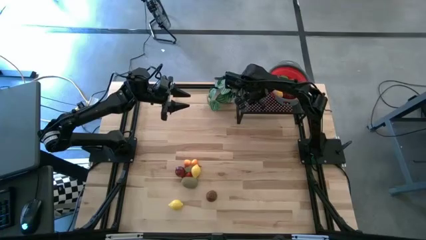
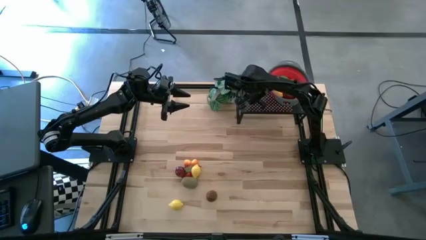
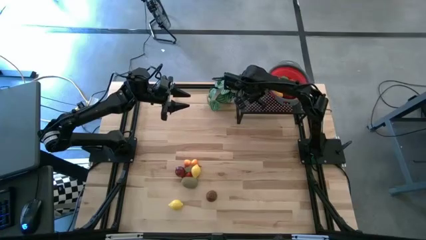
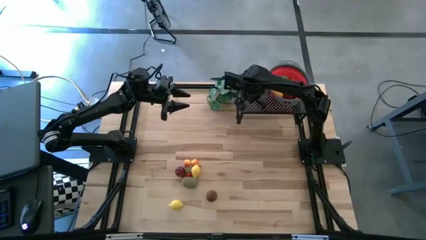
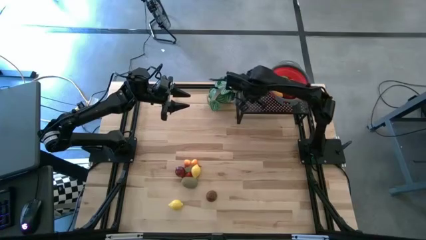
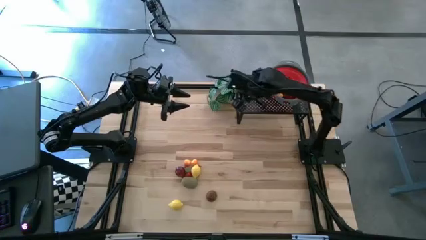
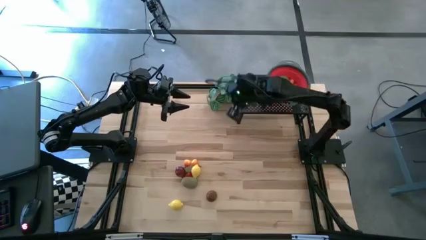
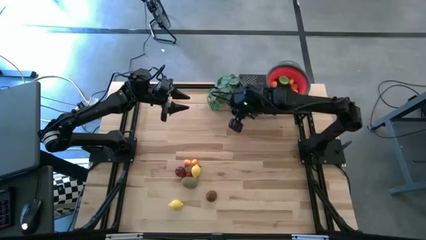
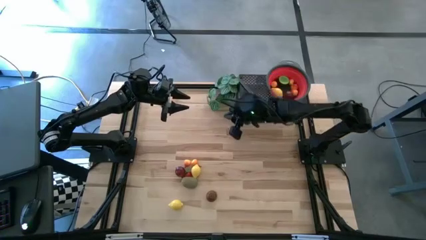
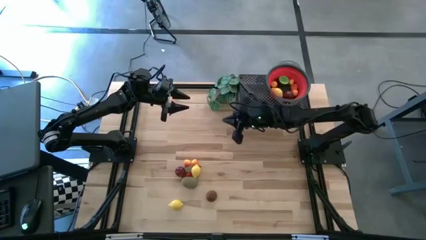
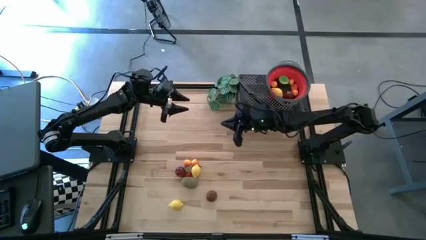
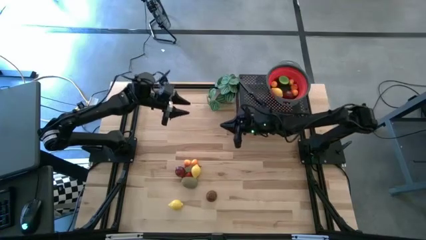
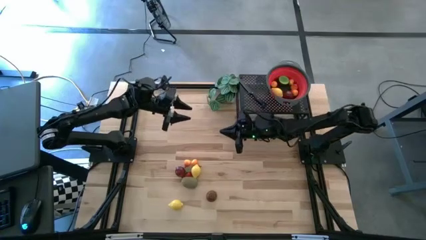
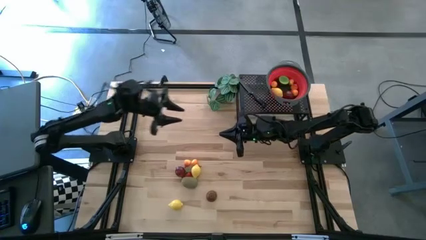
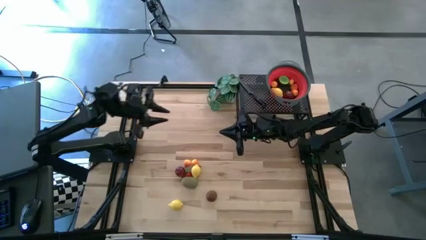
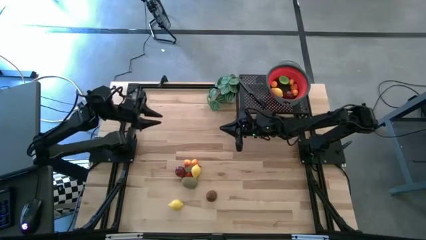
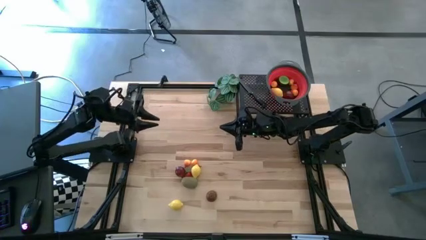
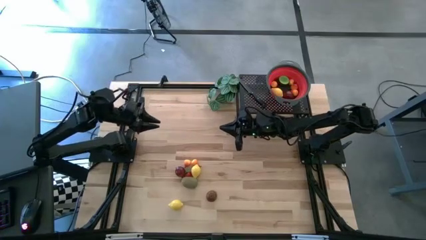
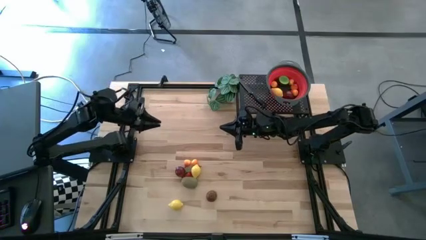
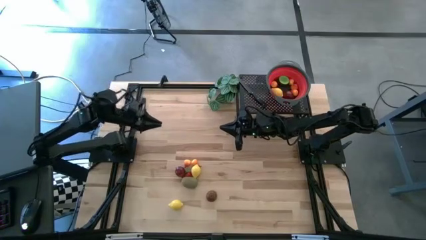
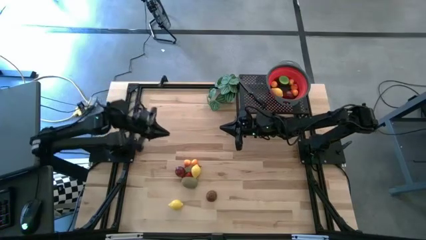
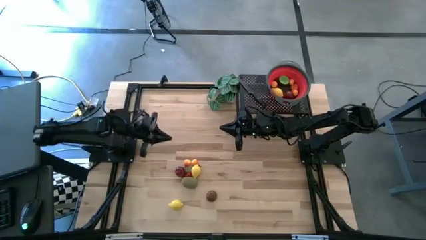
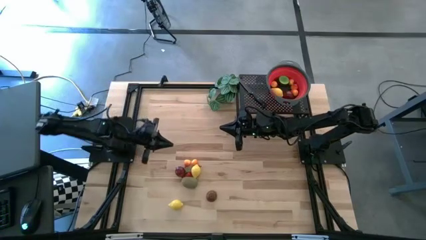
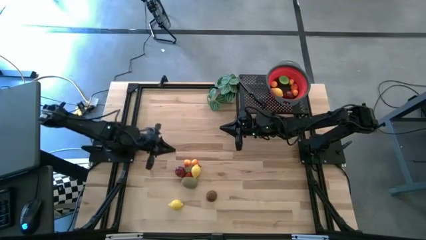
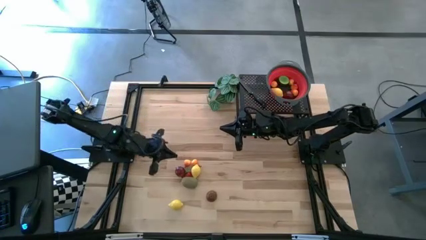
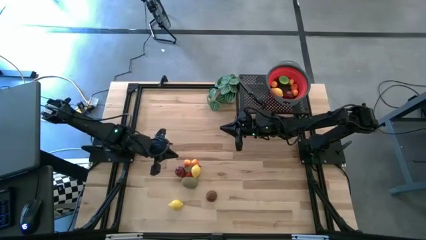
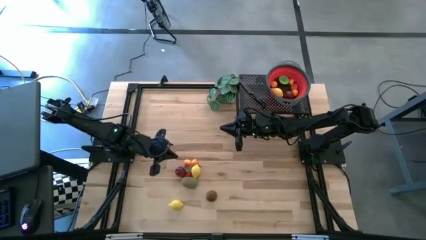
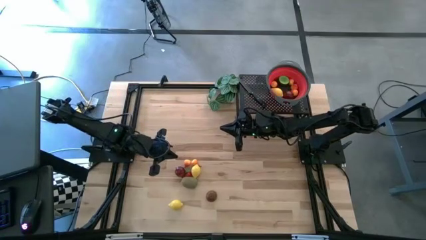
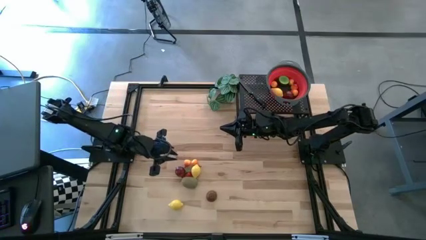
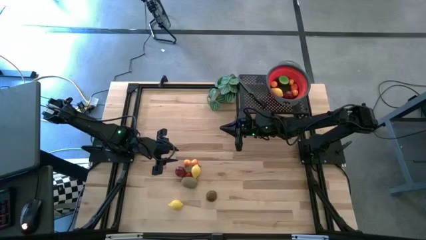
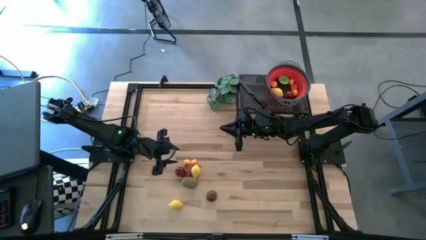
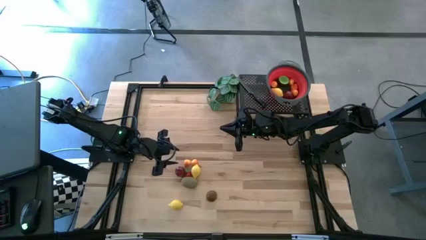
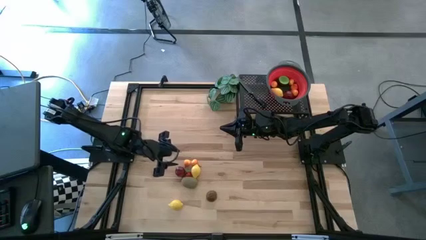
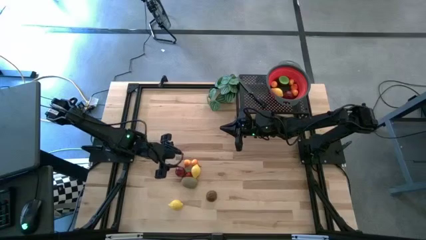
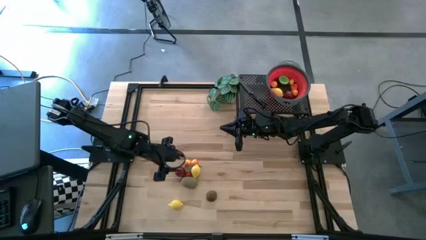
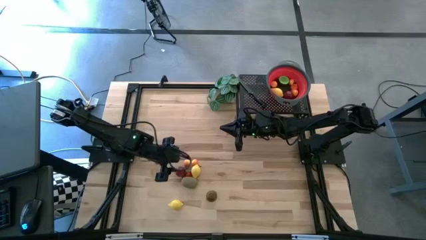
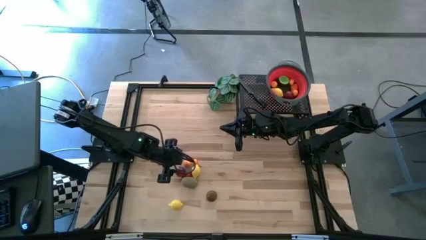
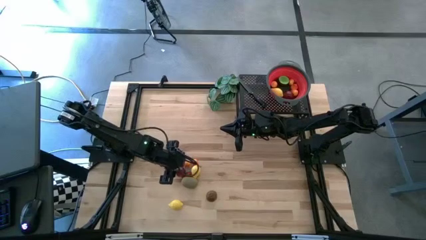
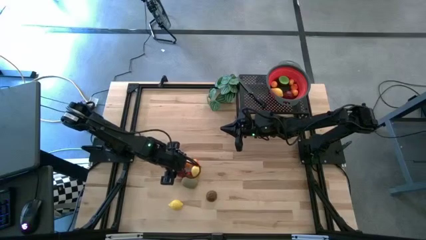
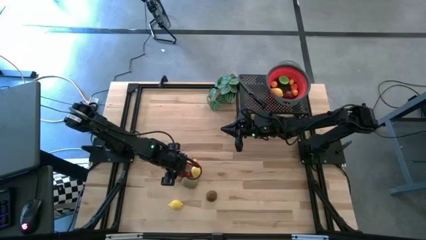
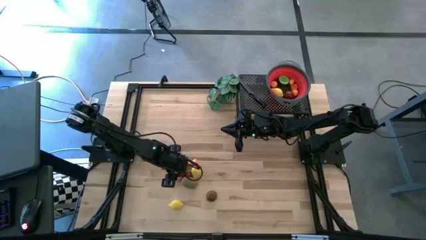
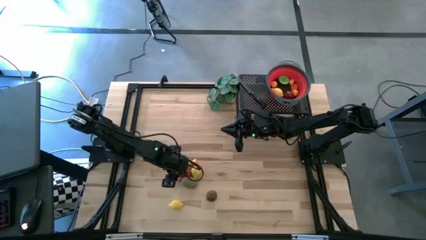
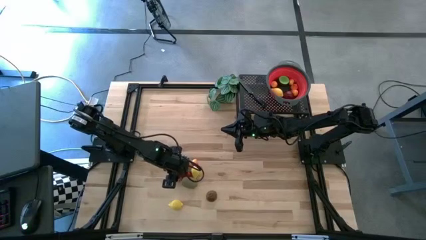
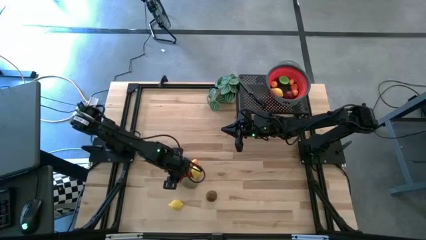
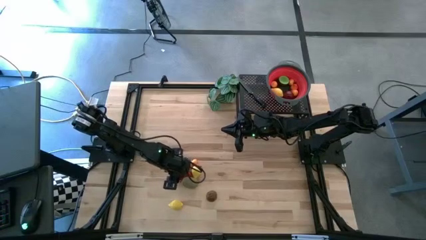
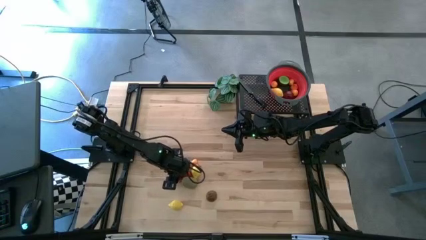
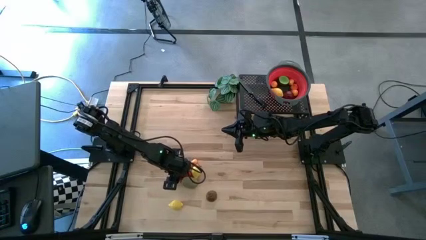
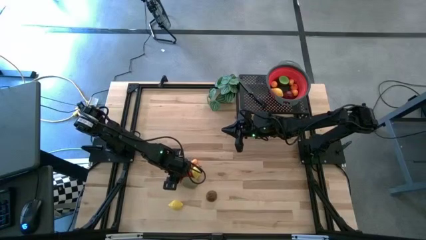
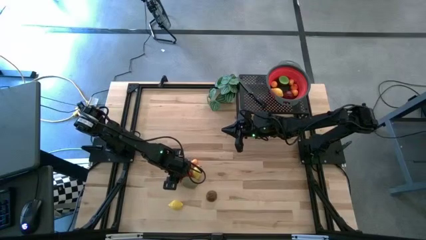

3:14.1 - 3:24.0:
Task: Pick & Place Fruit
Put the red pomegranate into the red strainer bowl

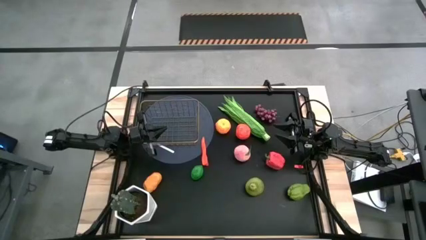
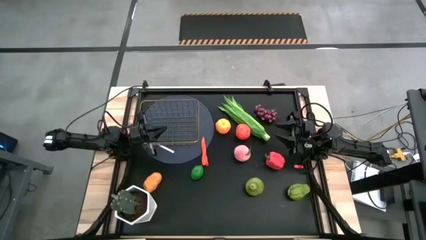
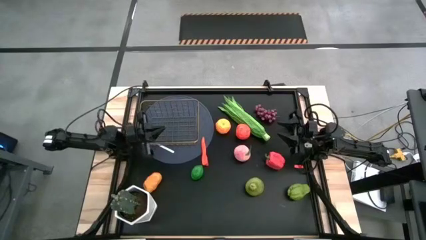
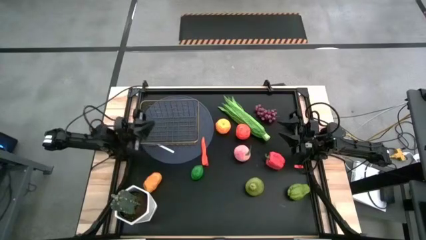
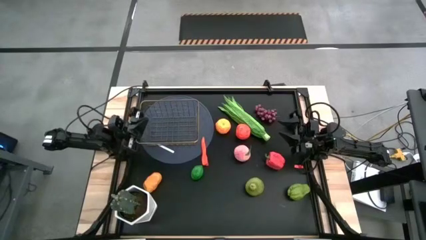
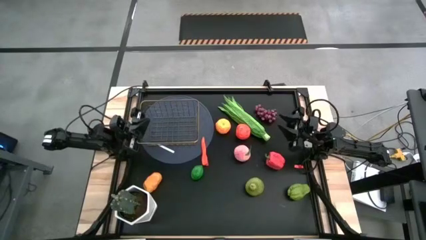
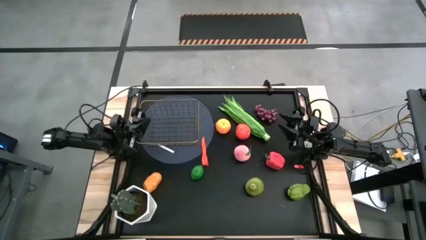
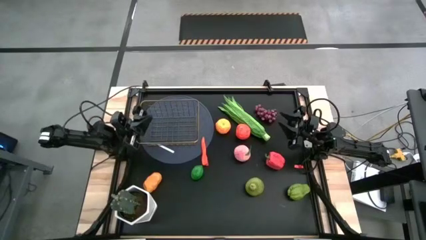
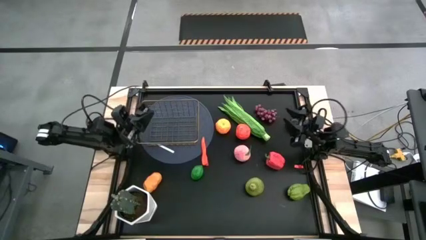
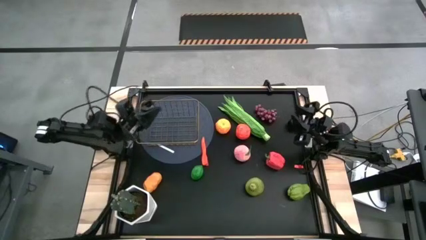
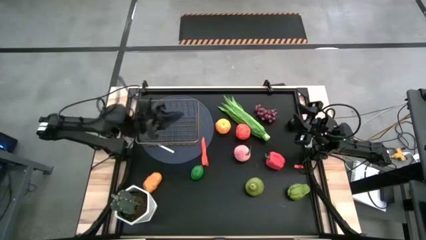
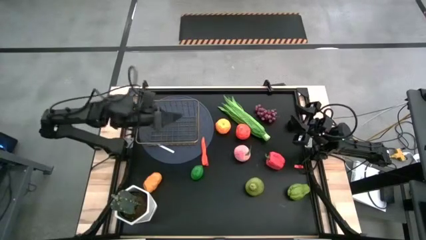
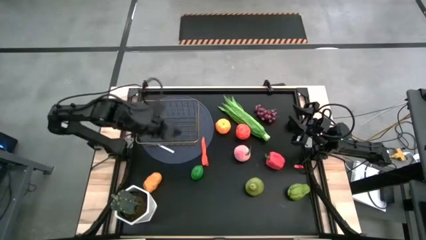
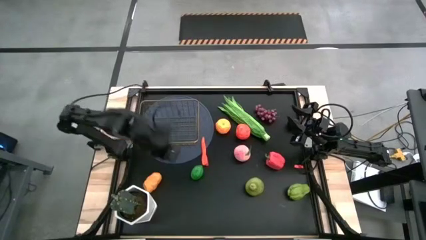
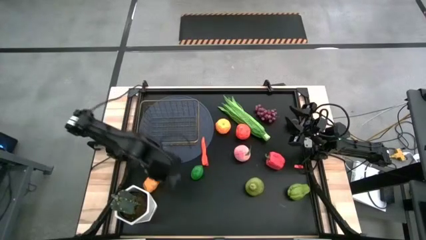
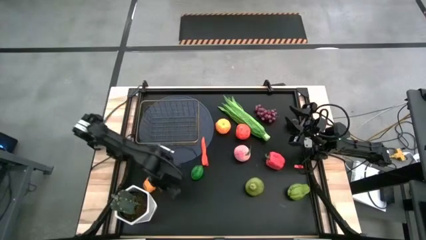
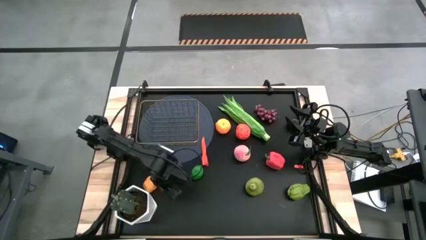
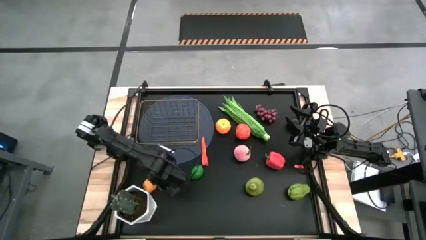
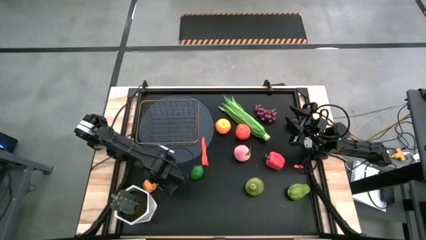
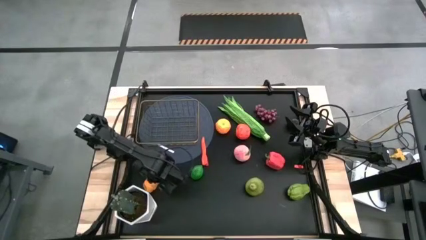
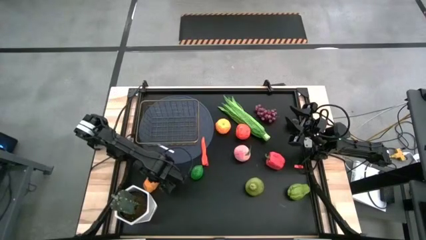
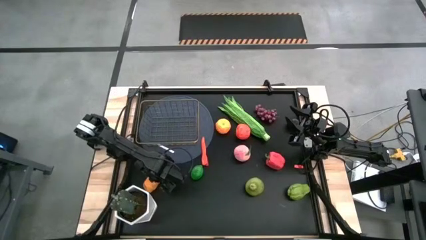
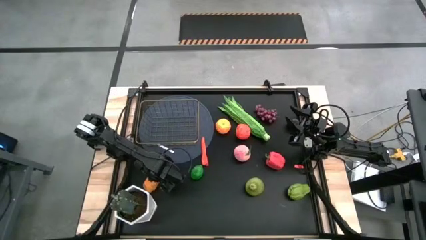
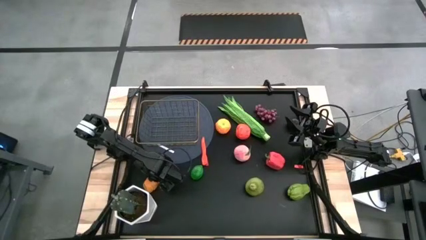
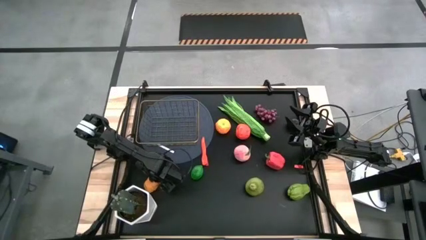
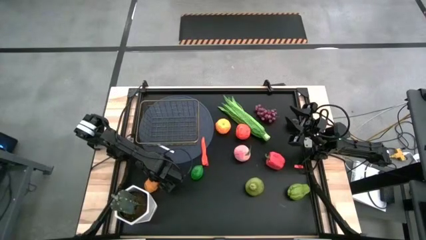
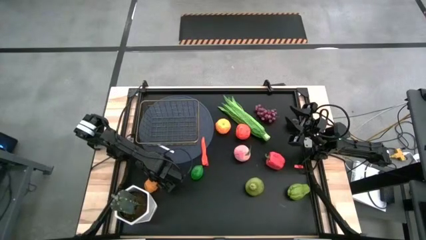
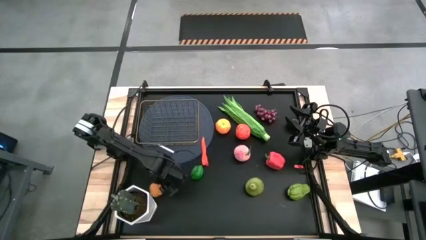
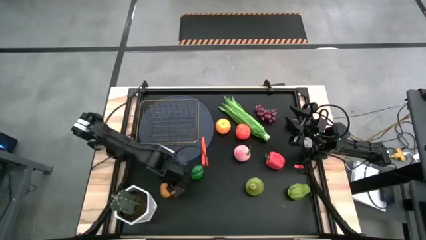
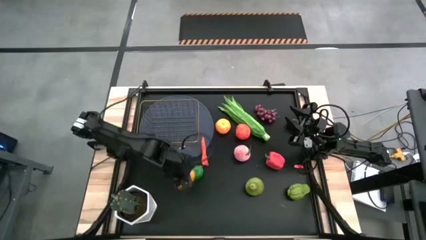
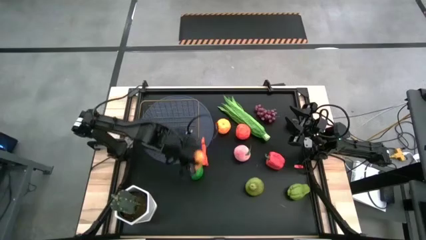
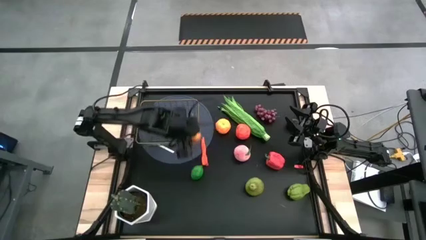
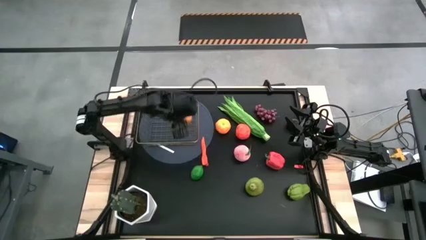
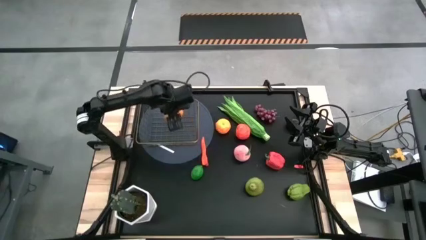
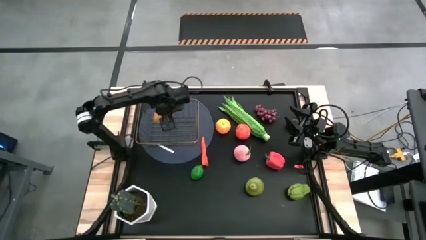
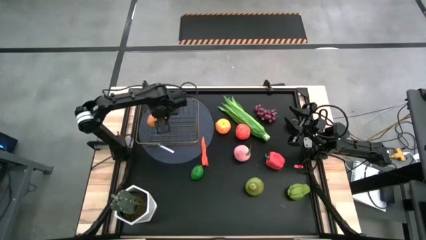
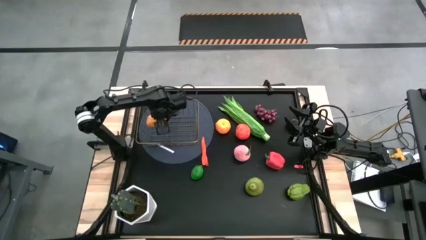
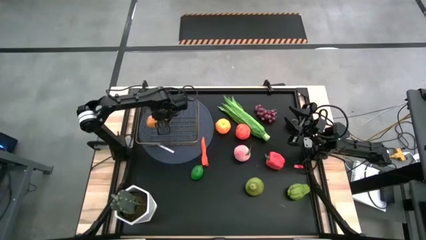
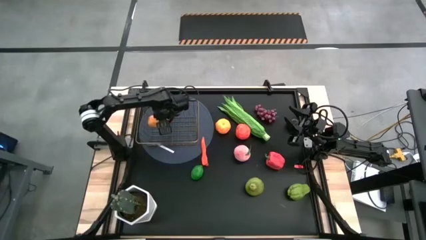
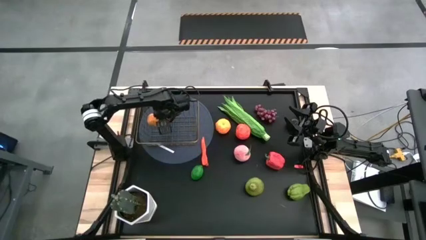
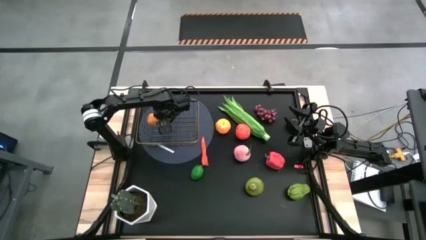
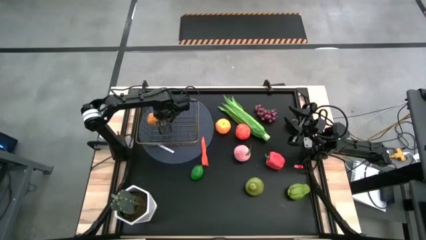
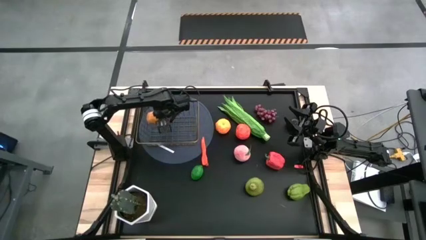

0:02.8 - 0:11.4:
Task: Build produce basket
Put the yellow potato into the wire basket
